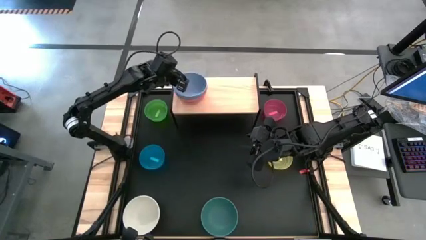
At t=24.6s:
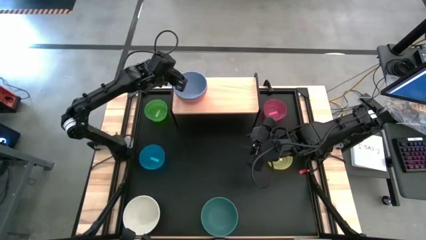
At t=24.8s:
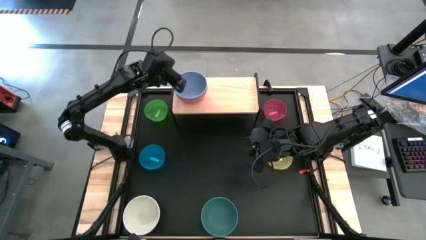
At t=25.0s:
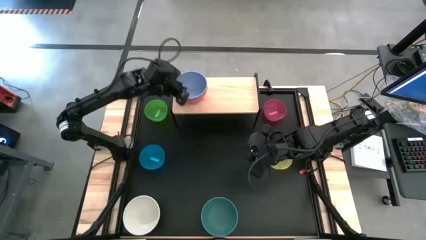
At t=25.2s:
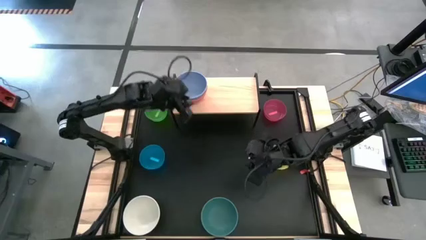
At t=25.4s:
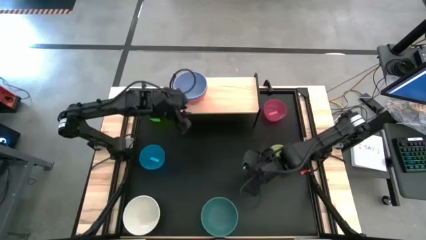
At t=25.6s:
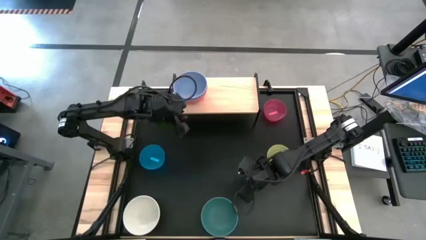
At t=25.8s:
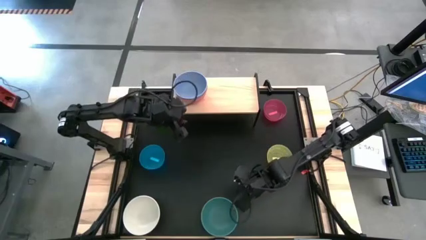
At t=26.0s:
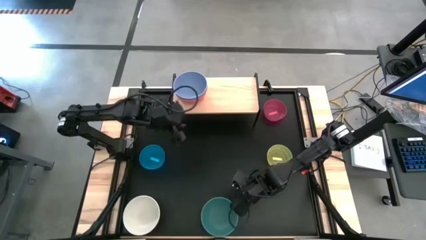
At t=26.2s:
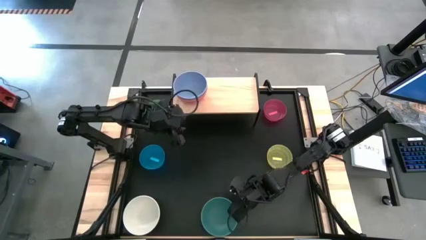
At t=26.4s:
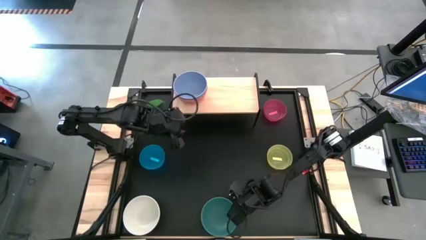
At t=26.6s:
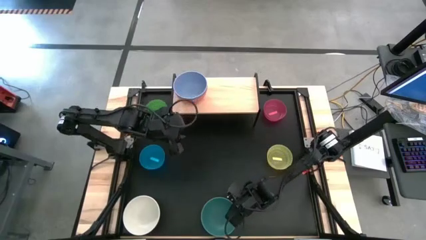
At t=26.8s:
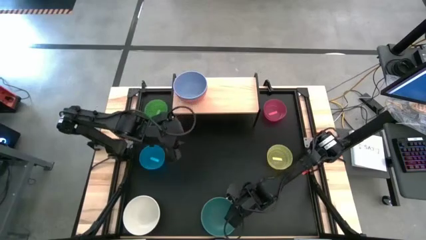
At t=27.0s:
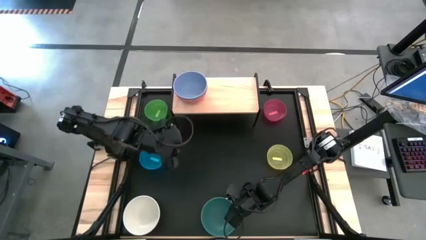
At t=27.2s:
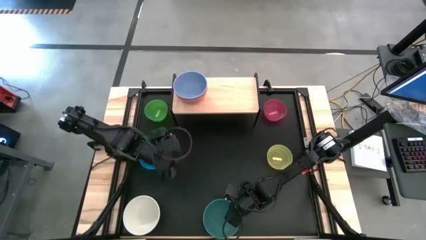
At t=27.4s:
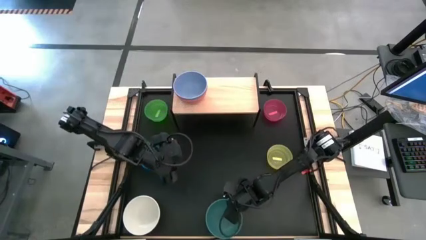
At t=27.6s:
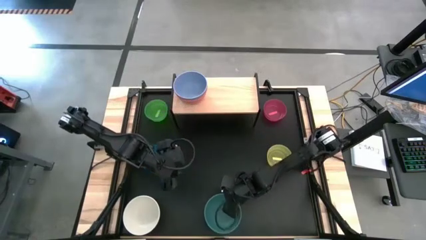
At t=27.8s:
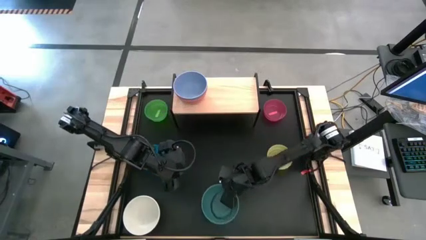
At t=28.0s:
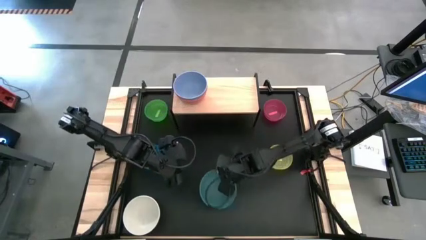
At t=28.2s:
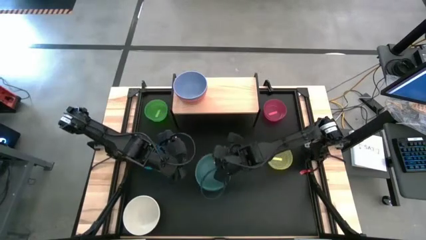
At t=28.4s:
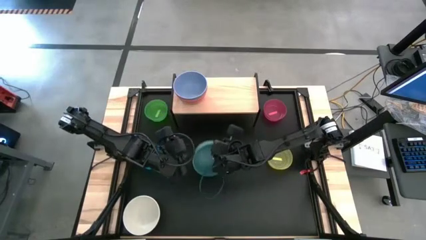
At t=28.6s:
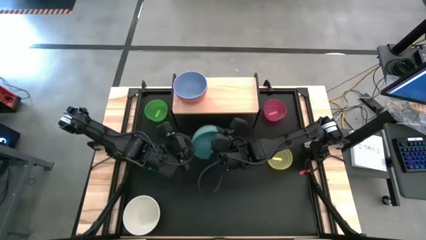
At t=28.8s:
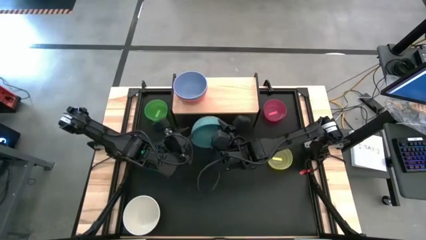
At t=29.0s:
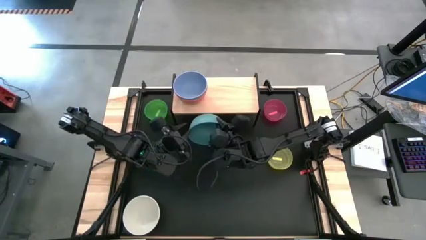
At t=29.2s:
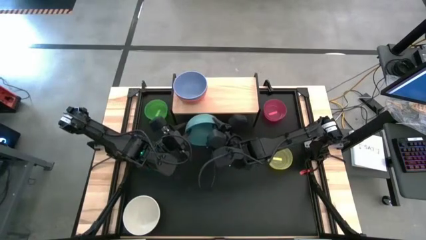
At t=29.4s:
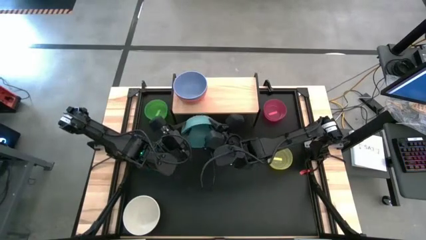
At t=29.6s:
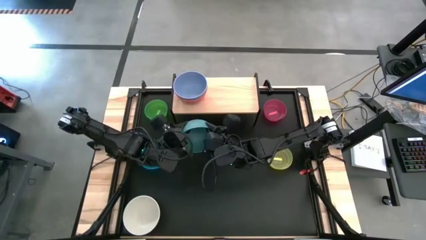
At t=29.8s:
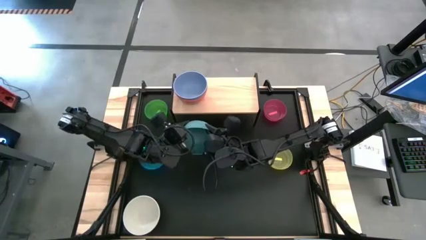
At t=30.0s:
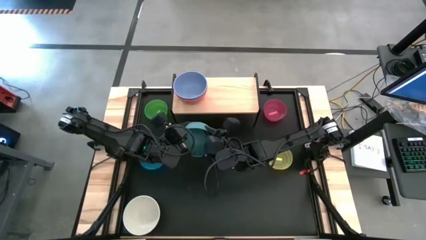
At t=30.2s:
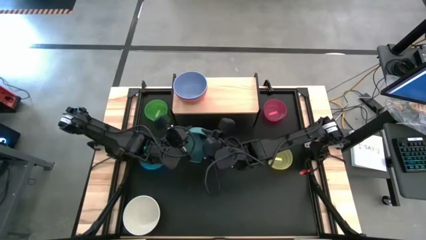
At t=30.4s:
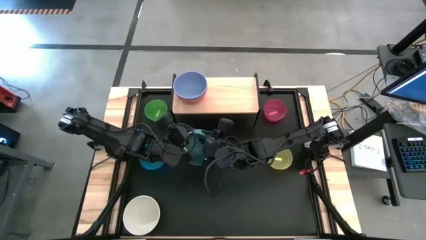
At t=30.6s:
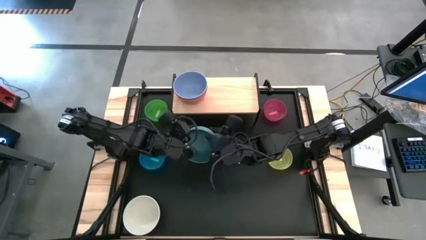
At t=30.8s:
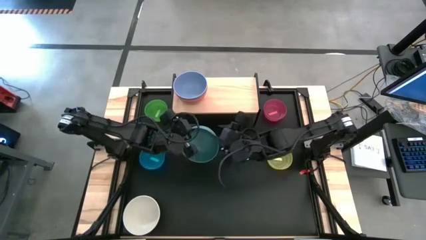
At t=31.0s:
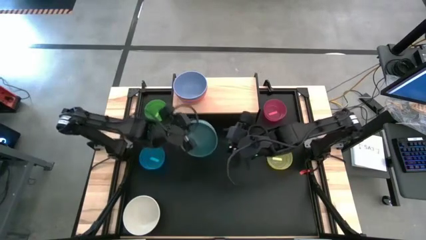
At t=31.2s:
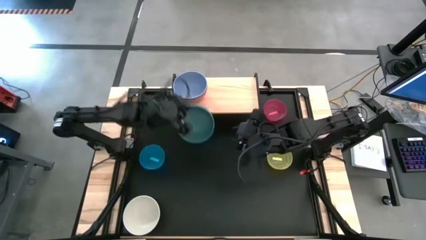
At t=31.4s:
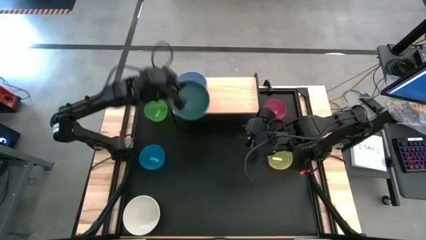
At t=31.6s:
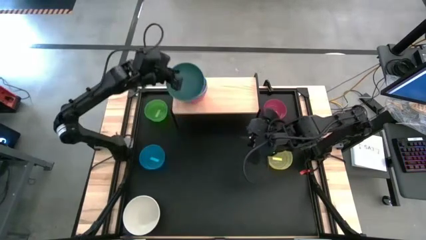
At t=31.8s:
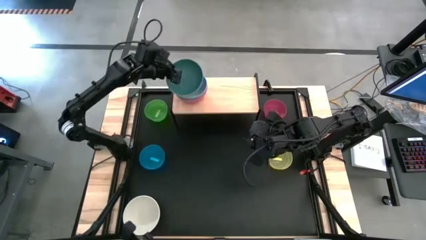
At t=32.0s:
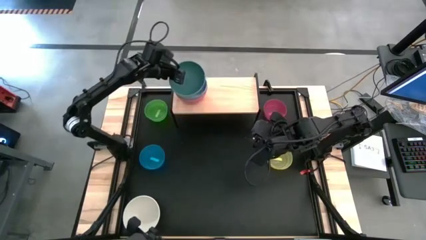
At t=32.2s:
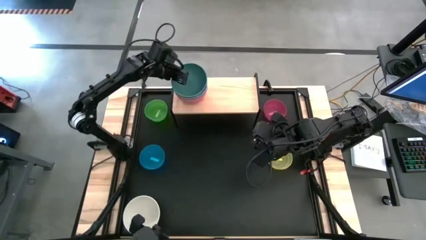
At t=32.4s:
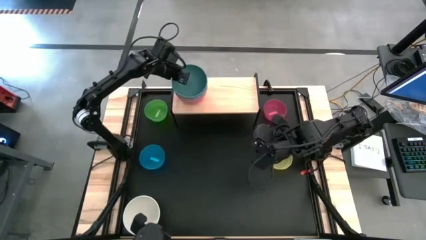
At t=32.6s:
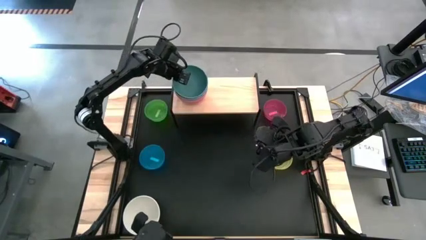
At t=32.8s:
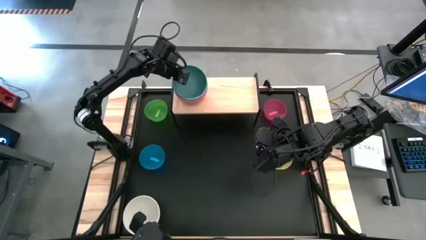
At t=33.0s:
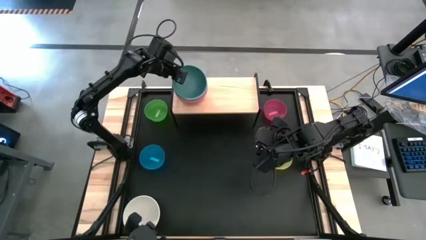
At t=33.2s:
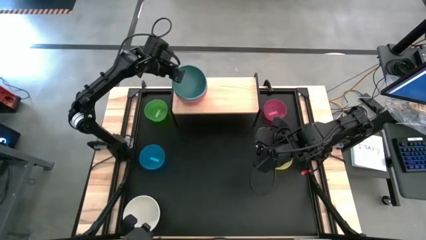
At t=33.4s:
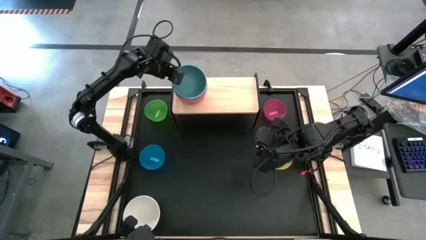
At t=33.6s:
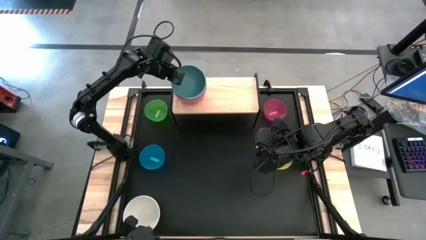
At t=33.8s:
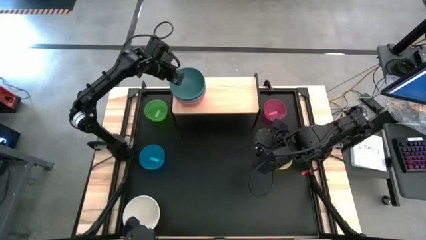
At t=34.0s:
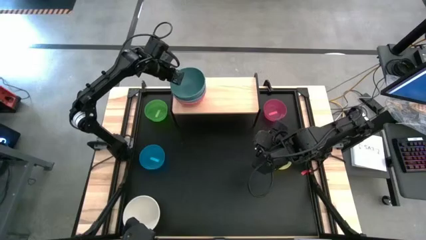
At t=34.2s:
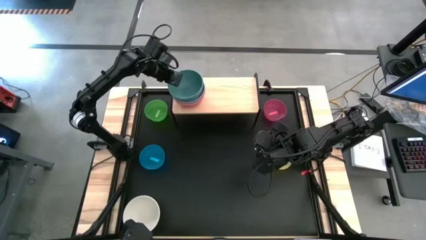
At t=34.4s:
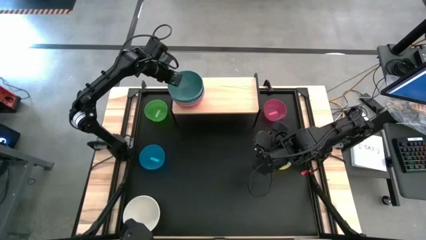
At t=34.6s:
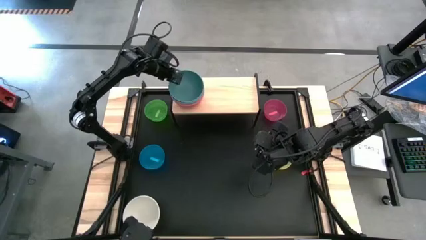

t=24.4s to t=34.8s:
Task: Place and stack bowls onto a shelf
Stack the green bowl on top of the large blue bowl on the shelf

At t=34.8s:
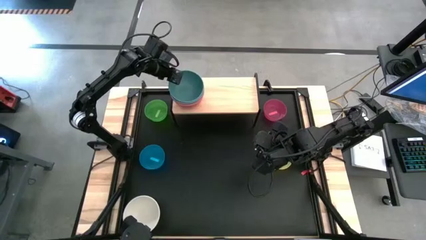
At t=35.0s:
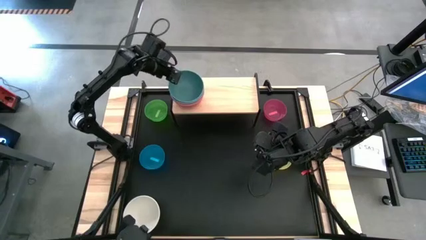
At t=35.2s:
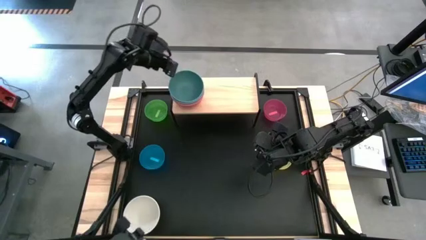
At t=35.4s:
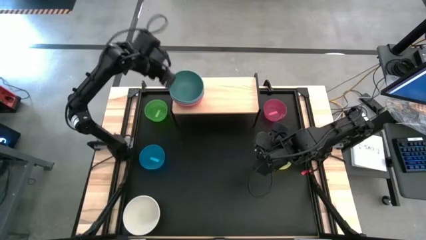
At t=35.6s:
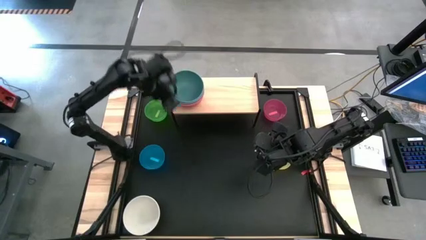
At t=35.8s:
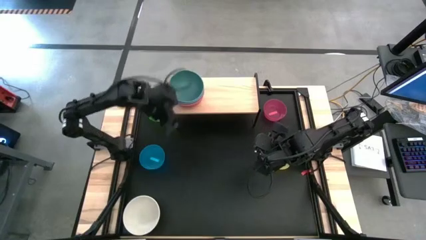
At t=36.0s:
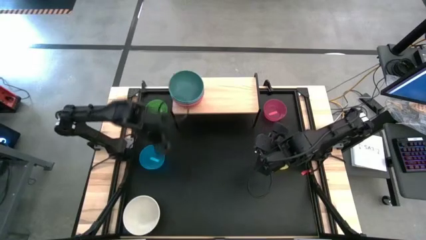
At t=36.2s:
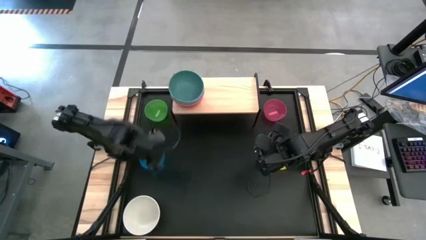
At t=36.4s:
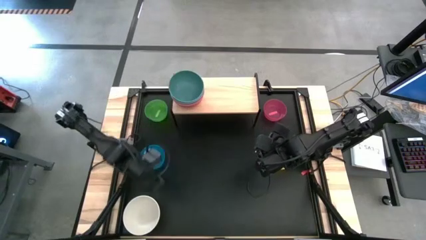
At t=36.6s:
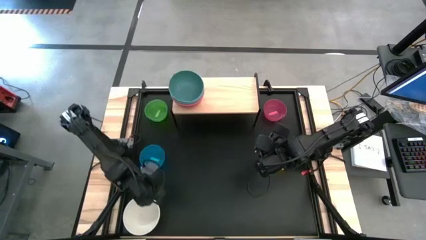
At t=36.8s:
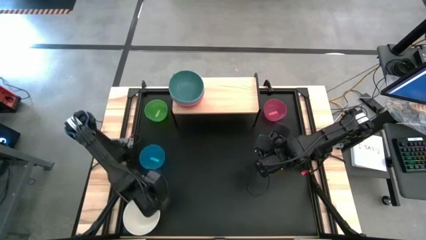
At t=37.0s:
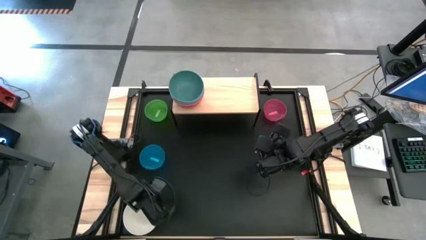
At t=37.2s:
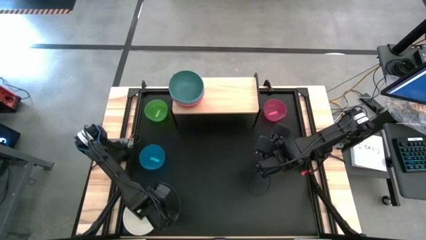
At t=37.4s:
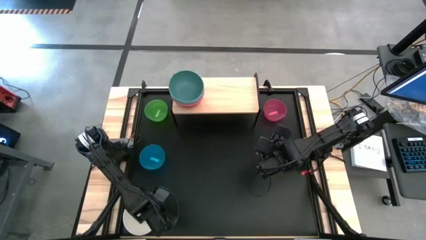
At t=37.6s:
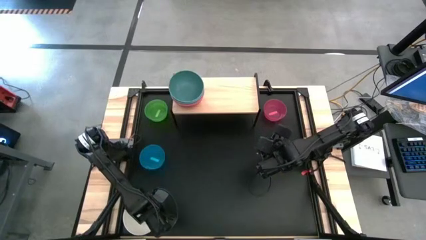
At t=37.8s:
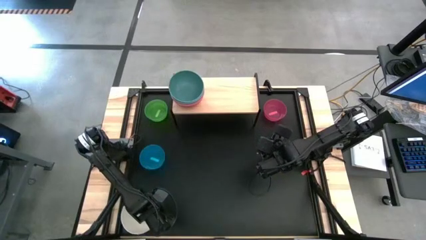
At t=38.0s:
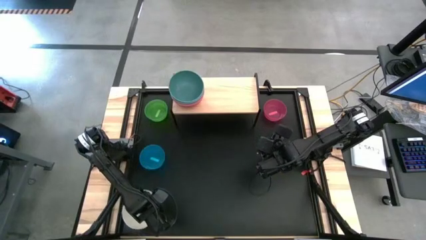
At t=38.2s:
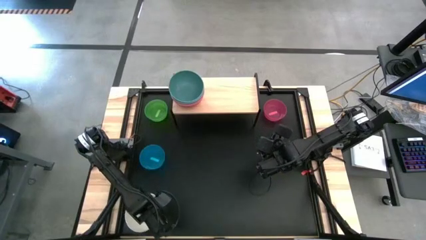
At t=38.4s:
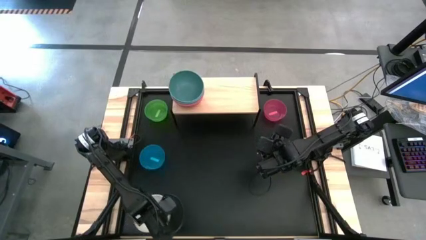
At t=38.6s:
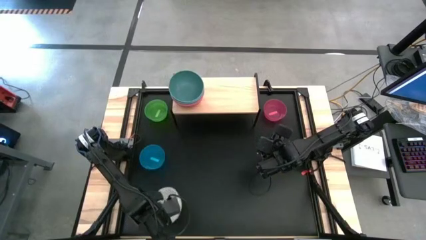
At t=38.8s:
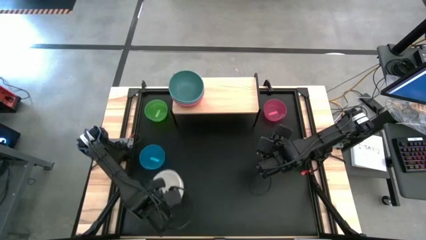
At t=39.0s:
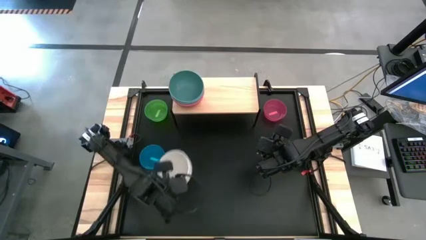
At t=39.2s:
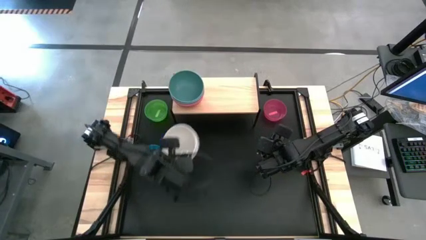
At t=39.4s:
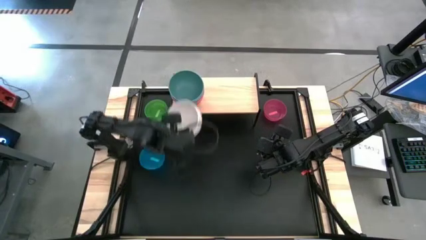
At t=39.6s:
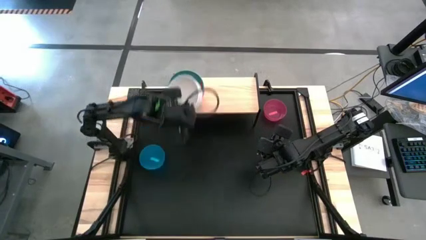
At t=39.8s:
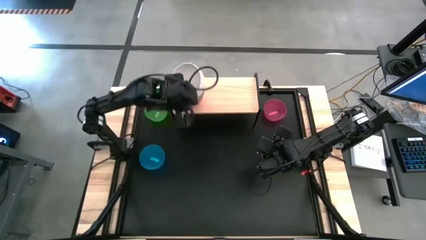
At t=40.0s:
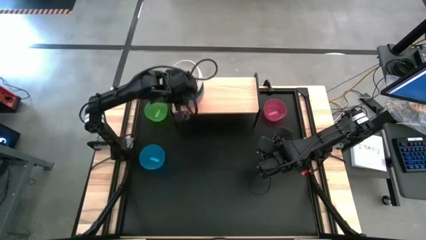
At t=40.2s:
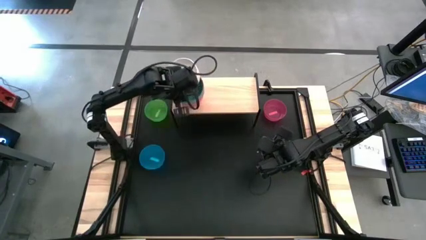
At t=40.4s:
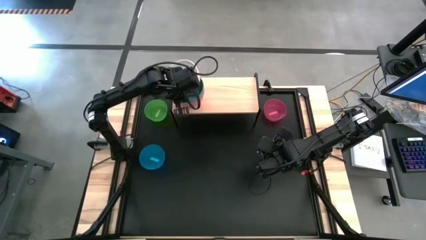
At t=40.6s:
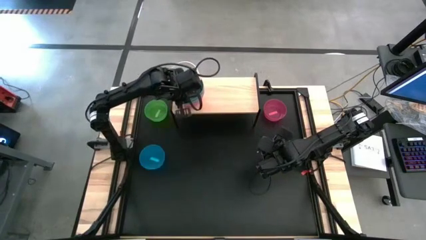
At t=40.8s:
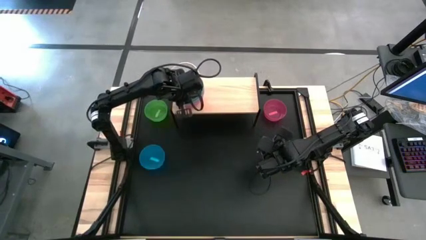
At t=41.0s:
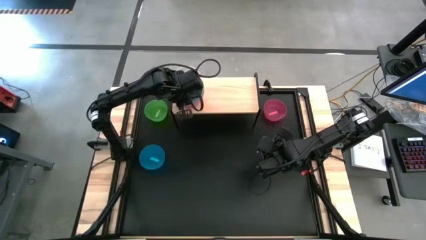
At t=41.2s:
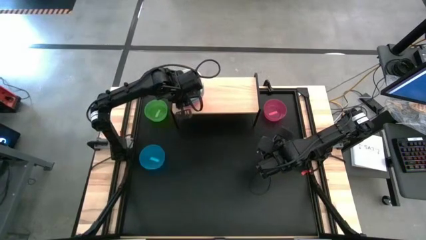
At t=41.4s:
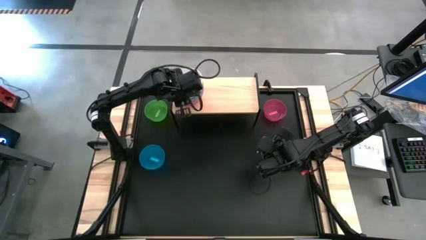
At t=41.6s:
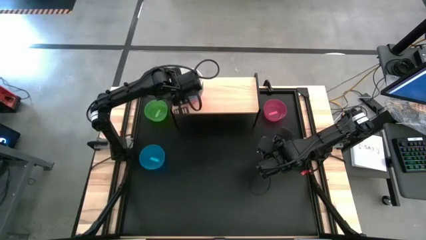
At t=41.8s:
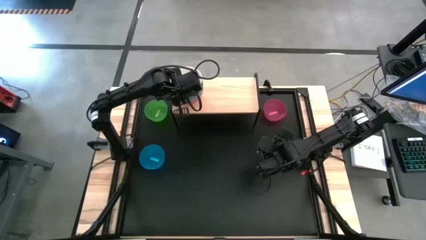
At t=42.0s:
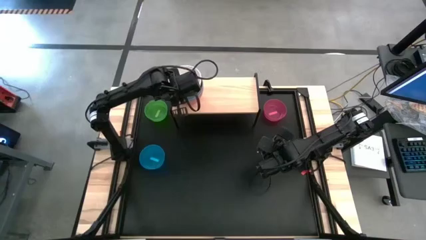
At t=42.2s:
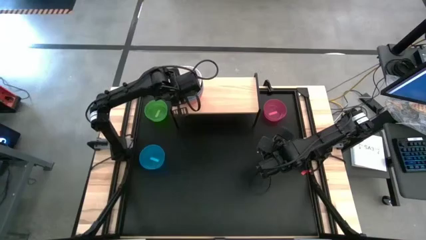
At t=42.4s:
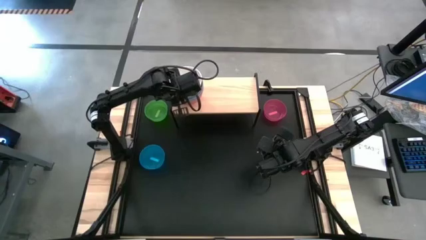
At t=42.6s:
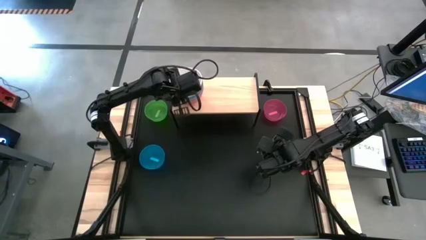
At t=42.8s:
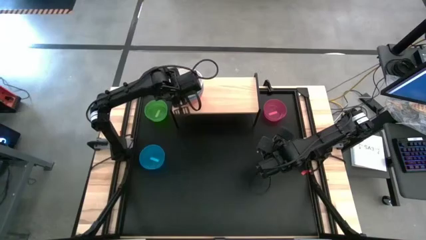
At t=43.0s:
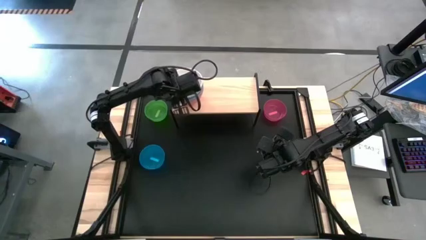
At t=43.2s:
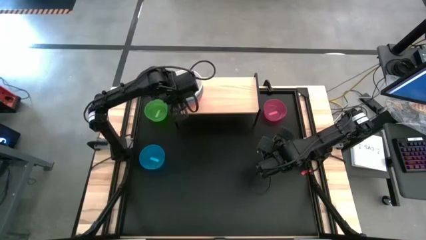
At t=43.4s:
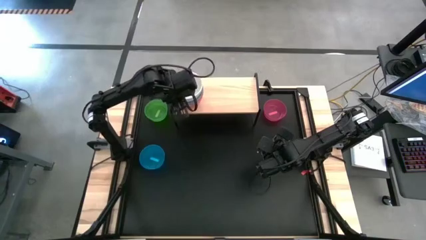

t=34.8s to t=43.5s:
Stack the white bowl on top of the green bowl on the shelf
